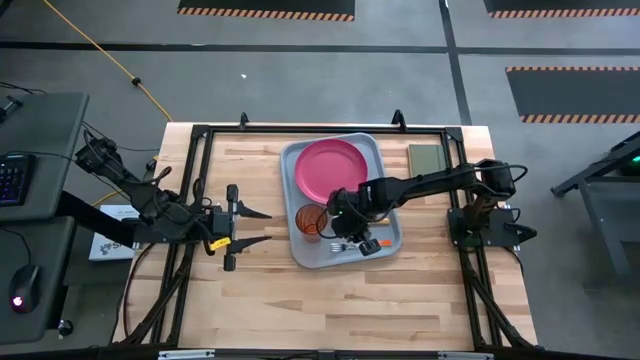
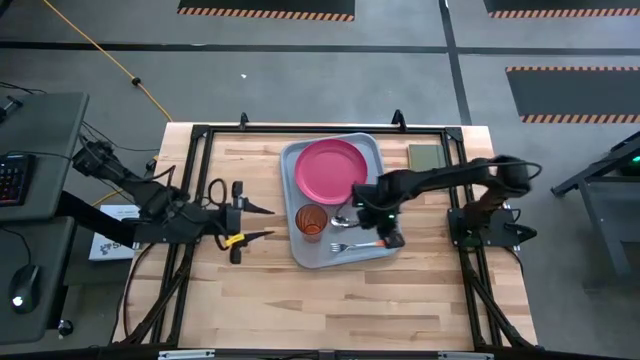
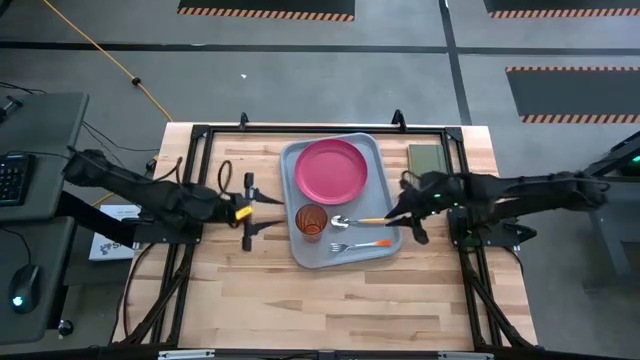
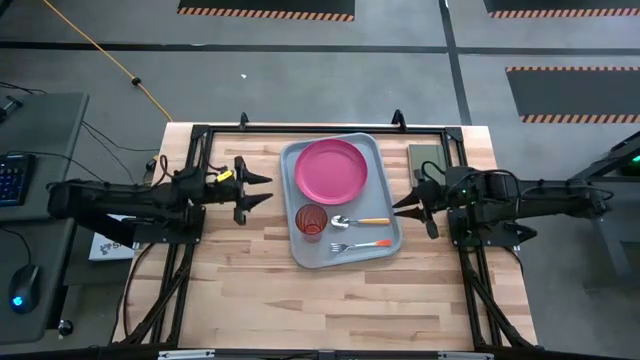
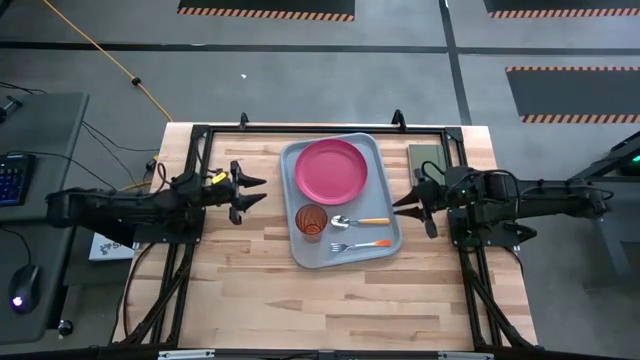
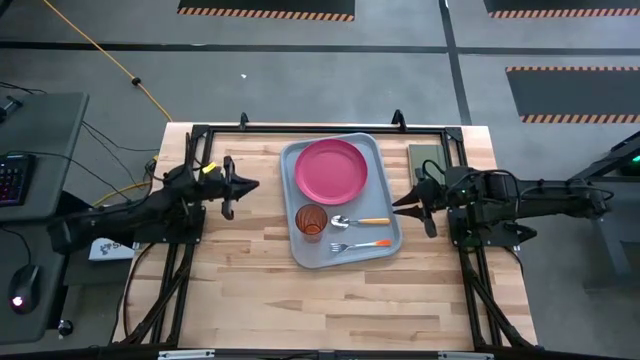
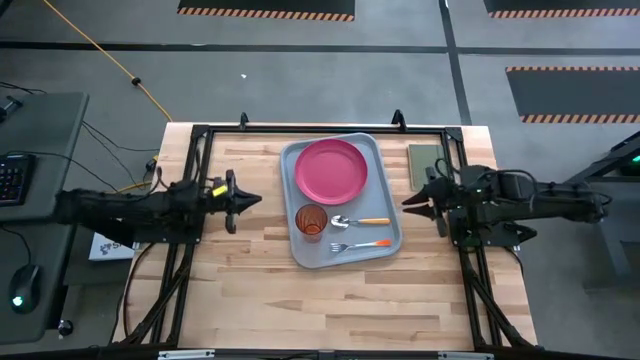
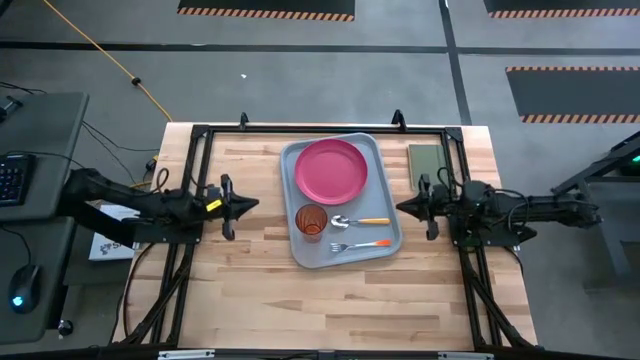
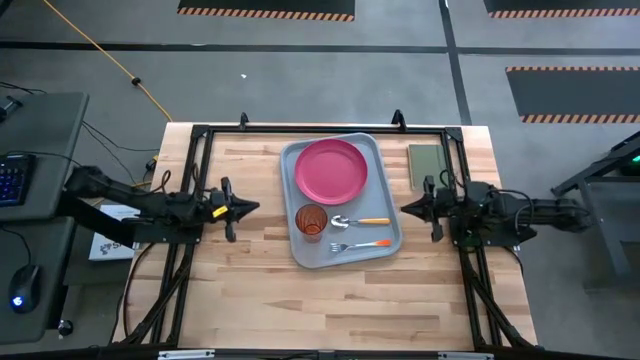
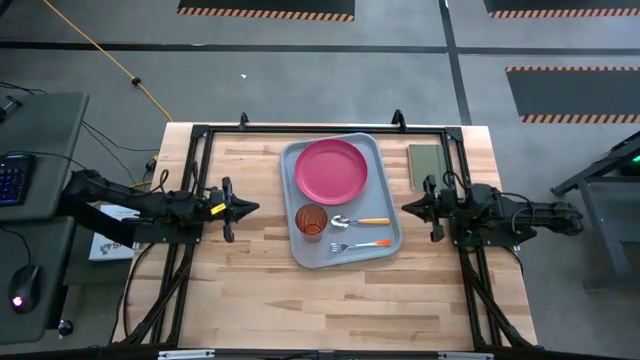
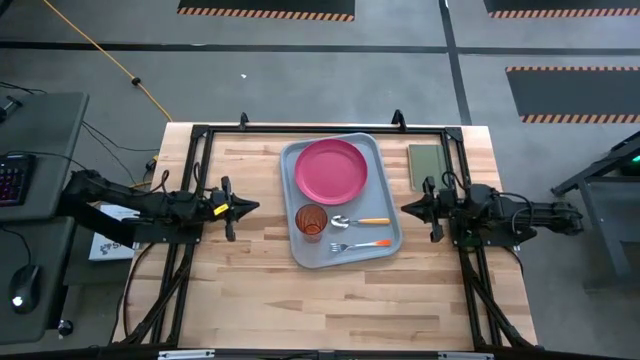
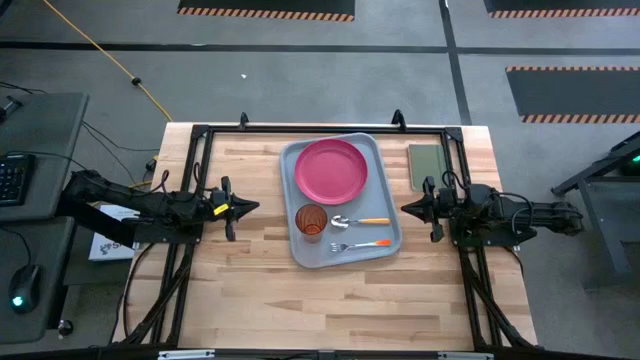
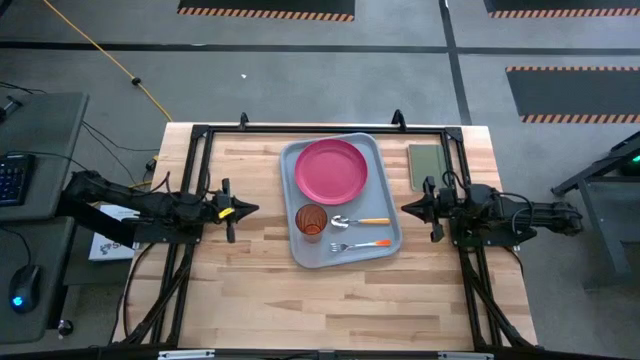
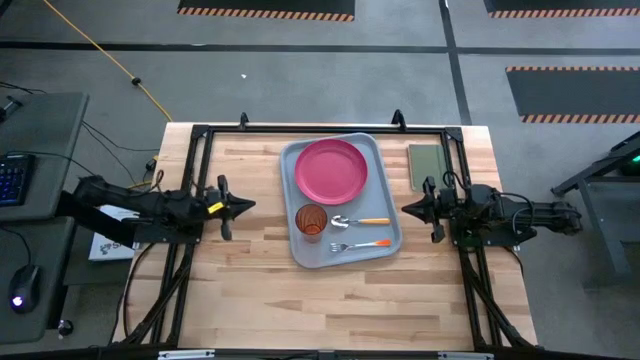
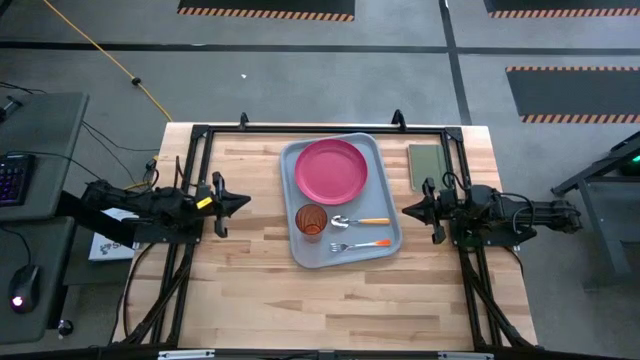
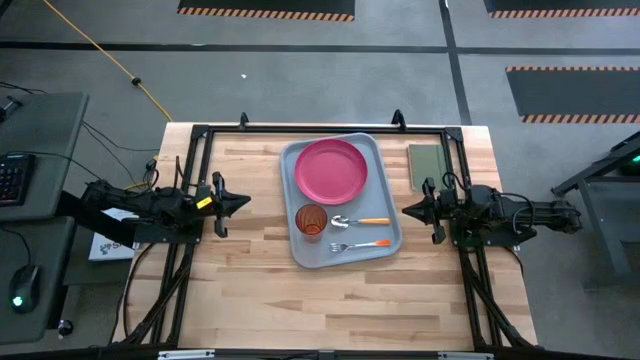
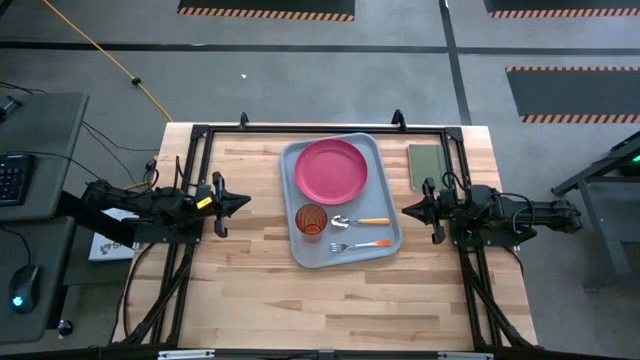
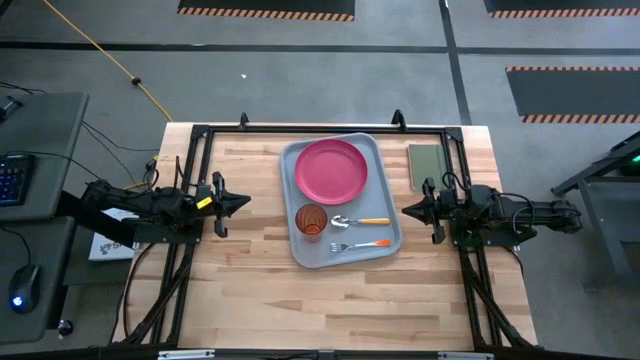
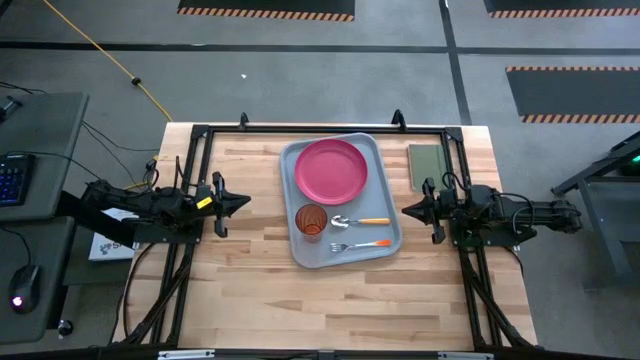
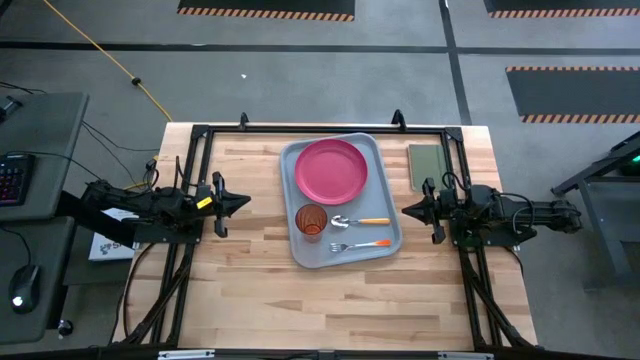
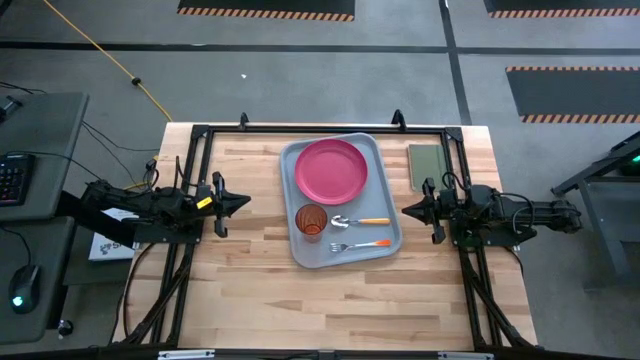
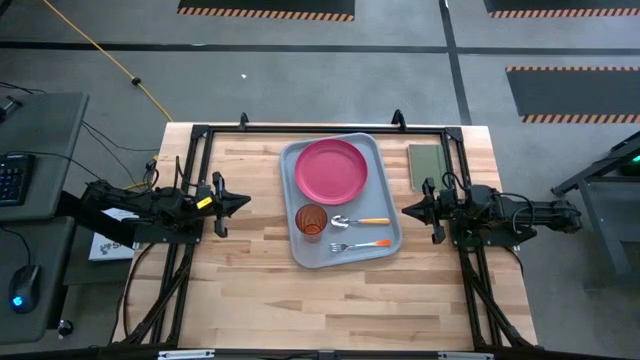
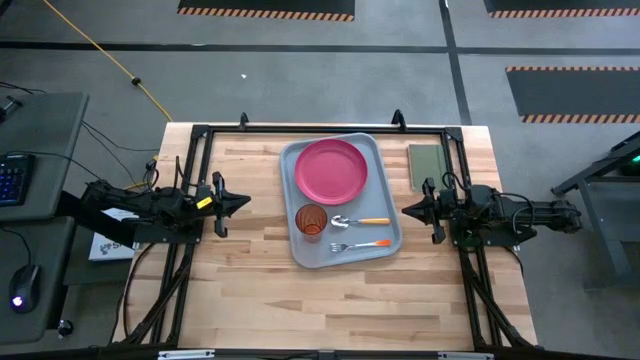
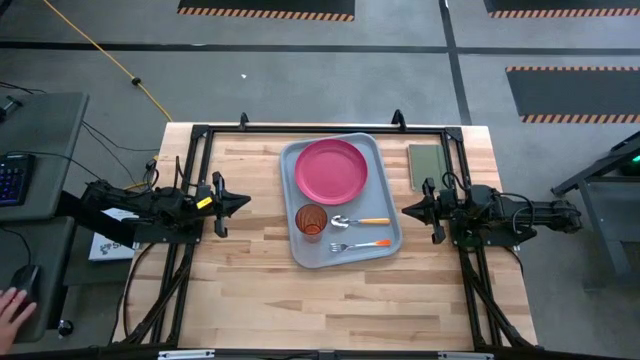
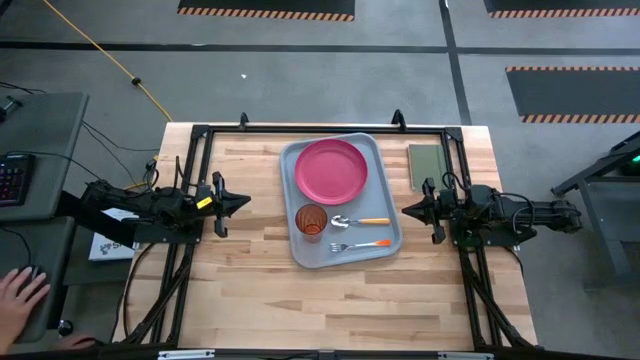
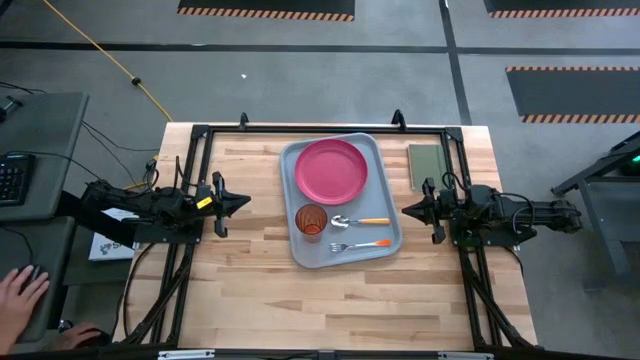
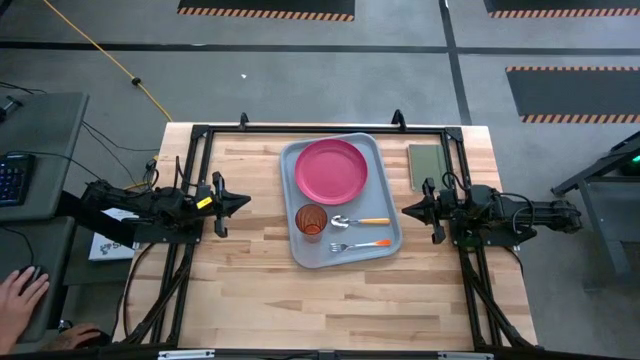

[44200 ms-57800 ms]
Task: Pick and place plate/cup/fork/spoon on tray
Return to Home Position

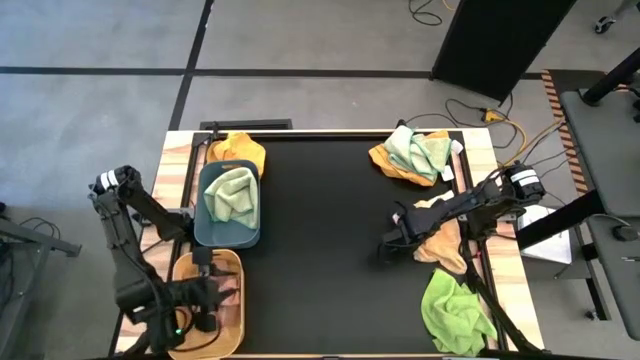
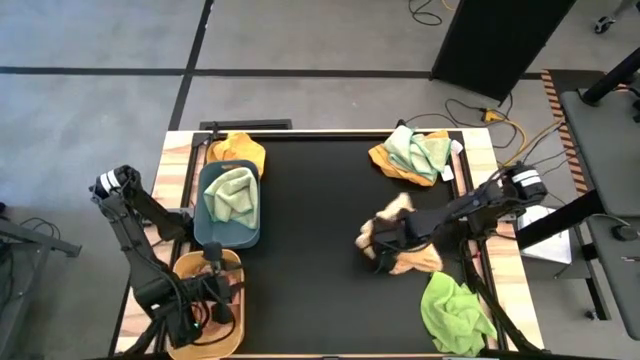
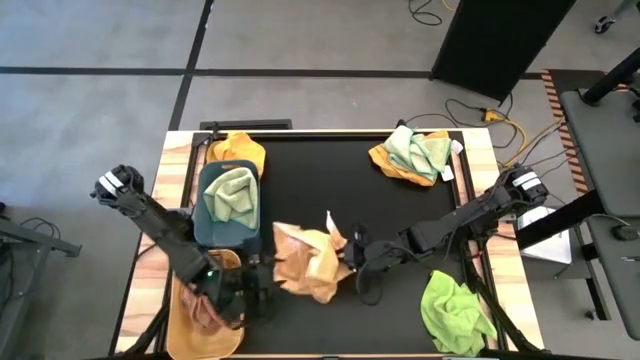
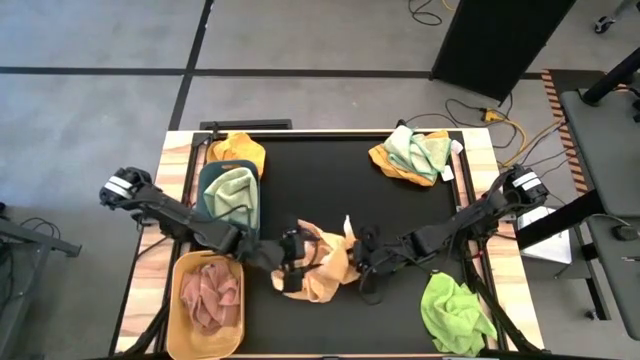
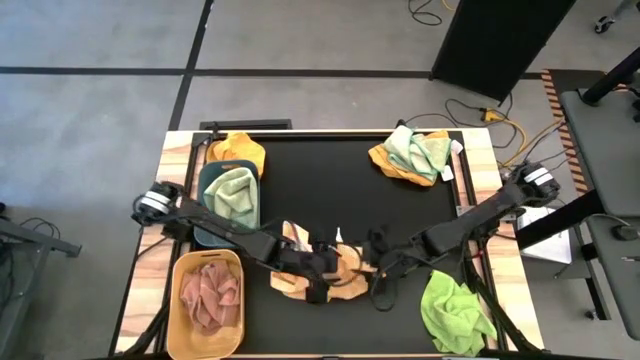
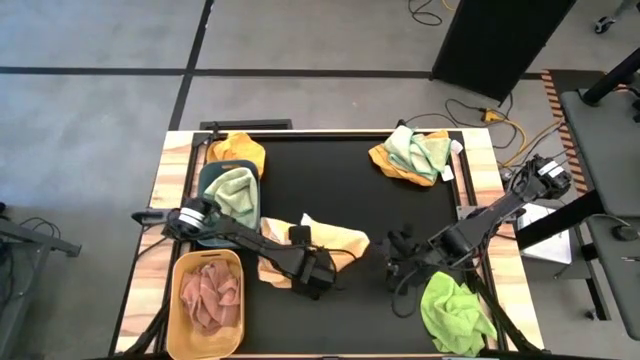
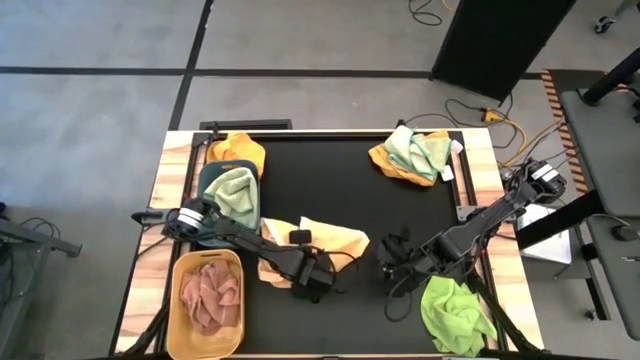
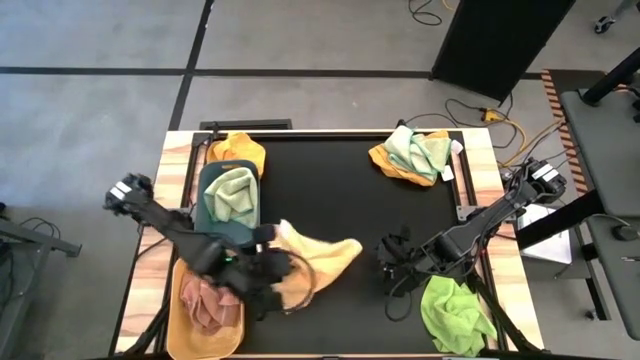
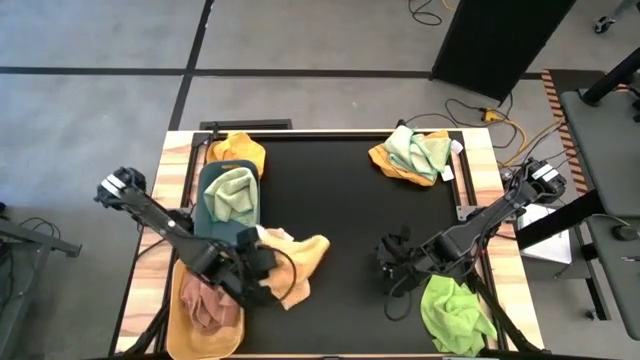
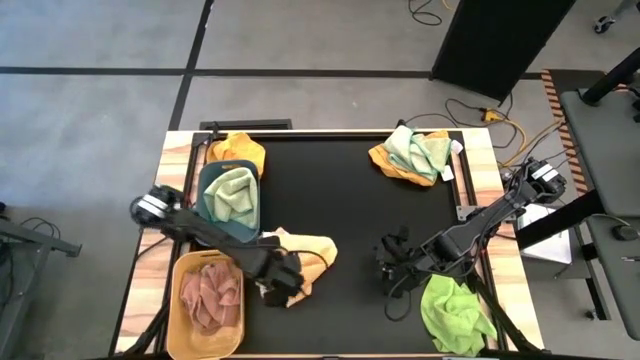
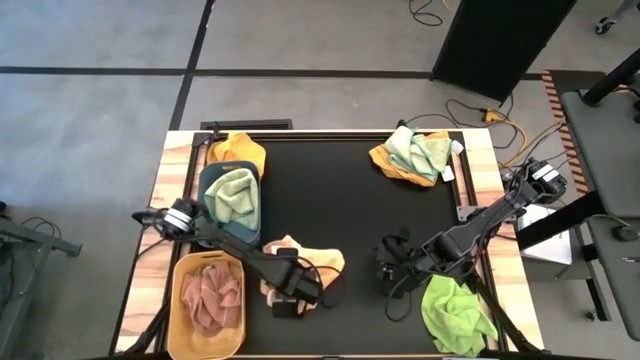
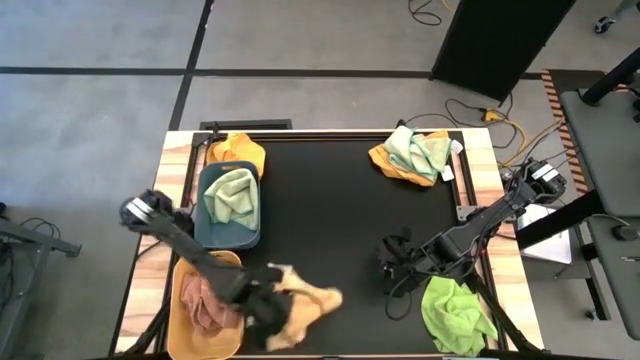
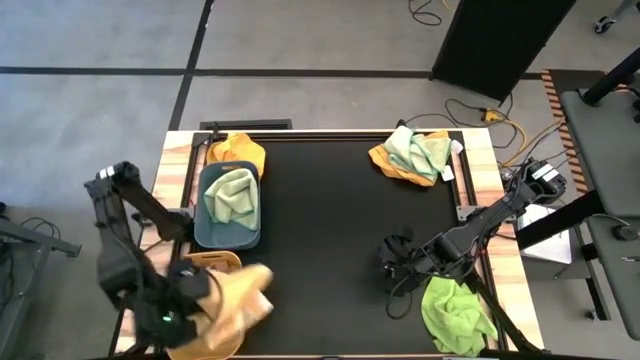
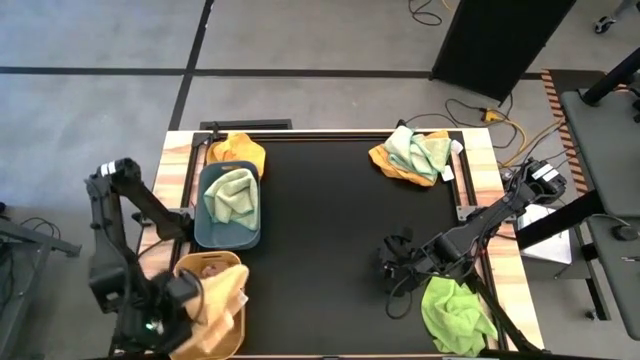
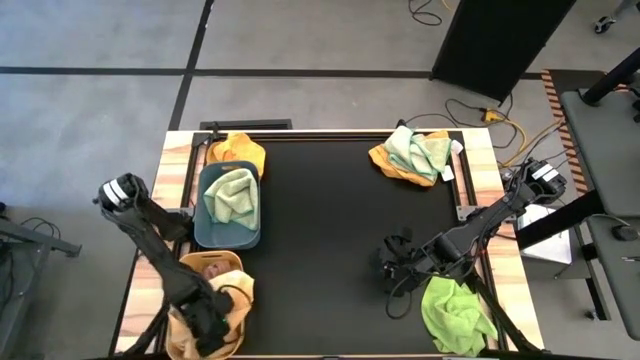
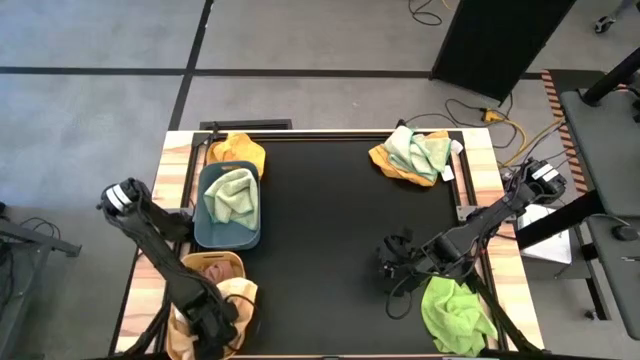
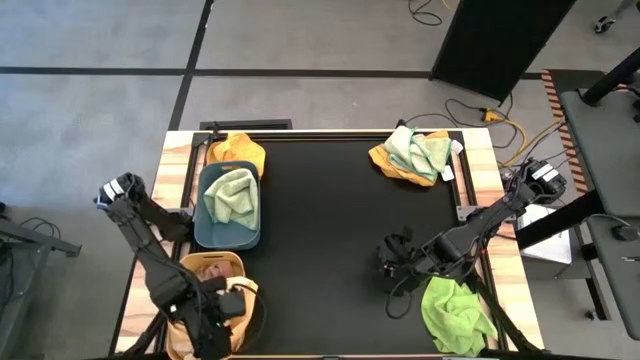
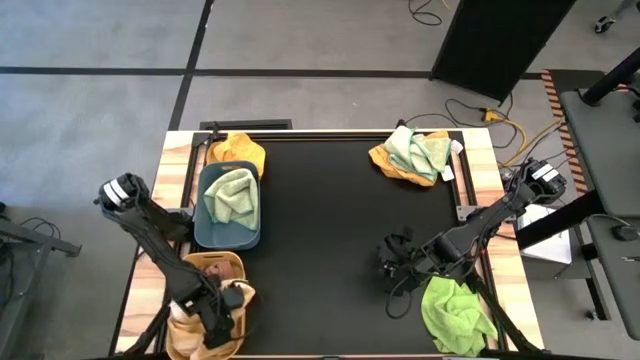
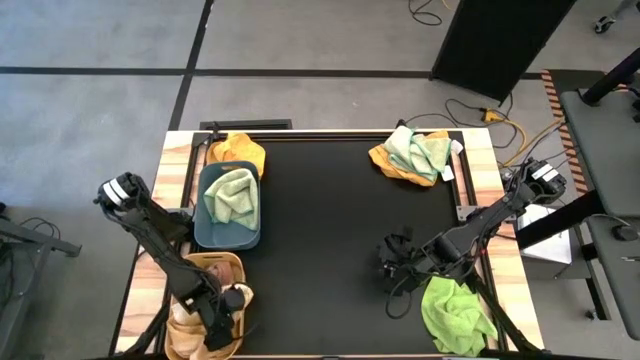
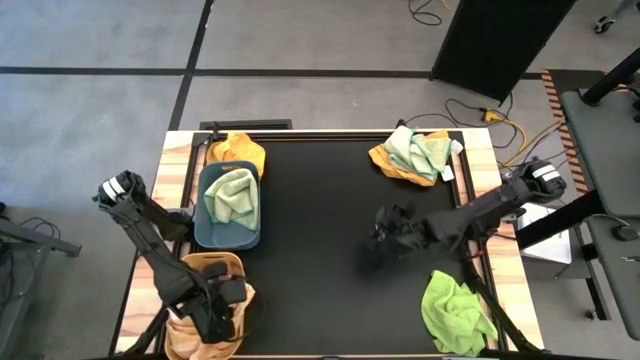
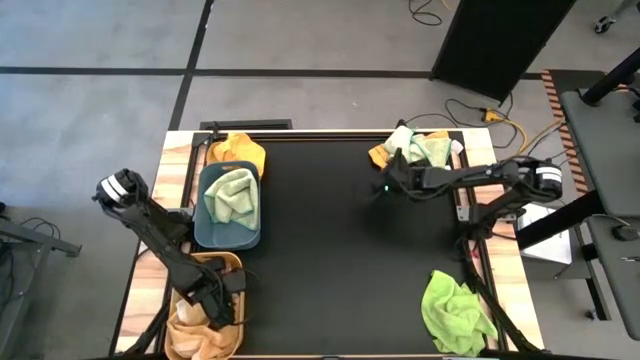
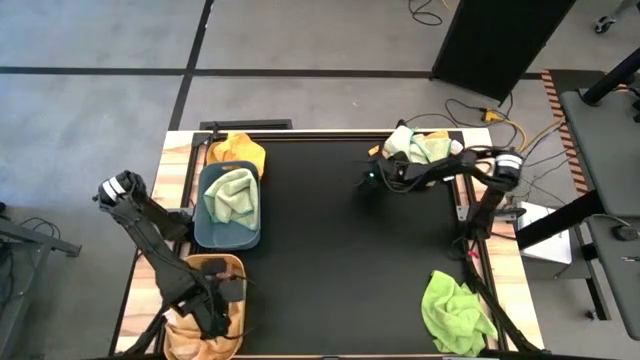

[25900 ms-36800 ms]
Task: Sort towels by color in basket
Put the orange kitchen towel into the yellow bin
